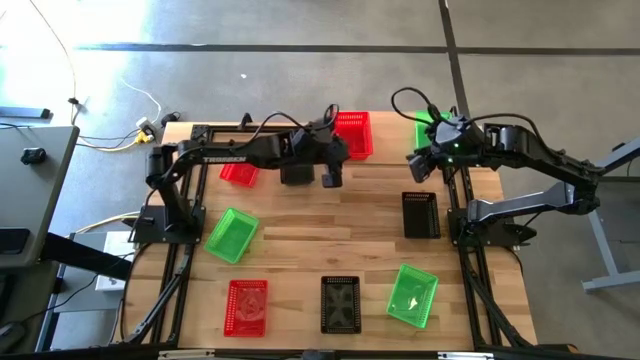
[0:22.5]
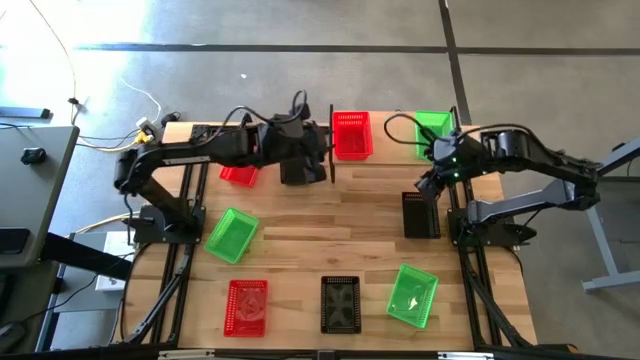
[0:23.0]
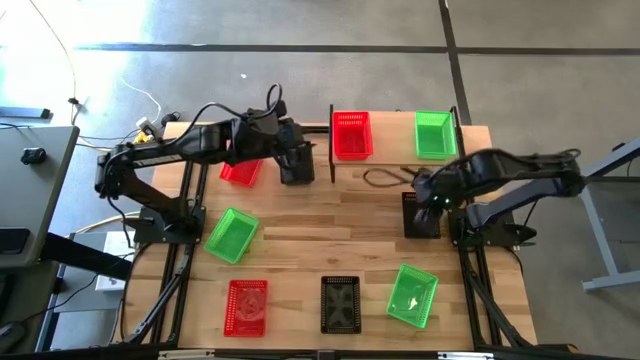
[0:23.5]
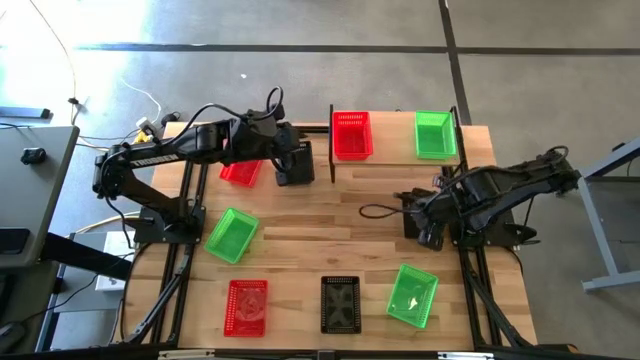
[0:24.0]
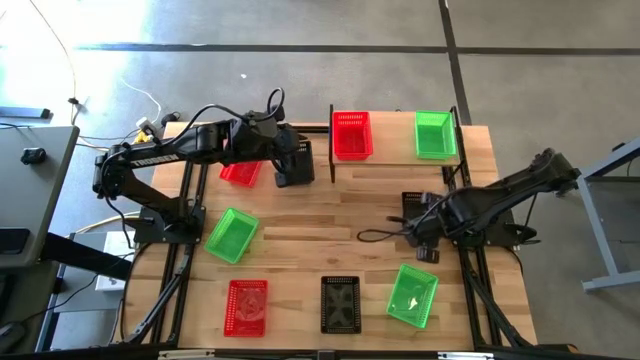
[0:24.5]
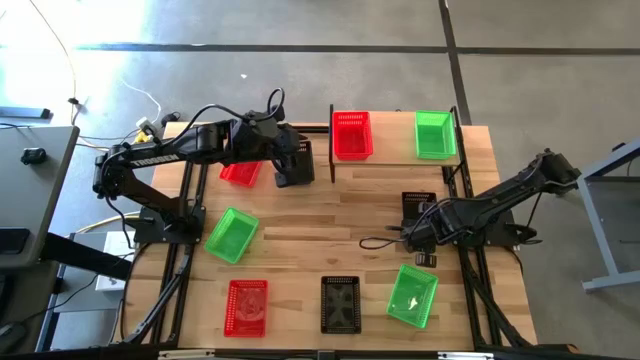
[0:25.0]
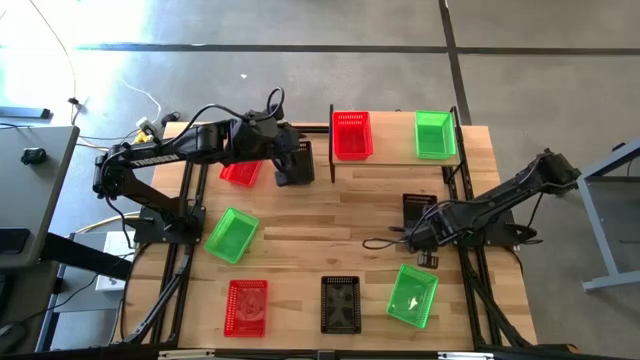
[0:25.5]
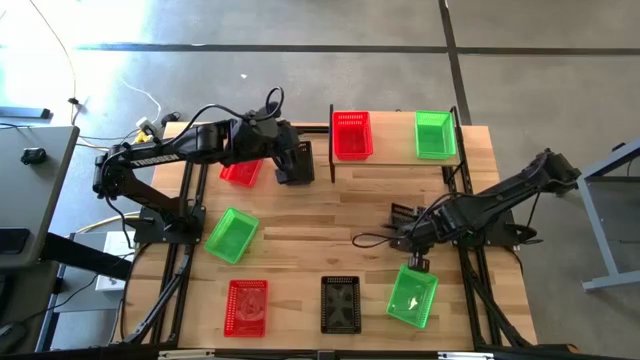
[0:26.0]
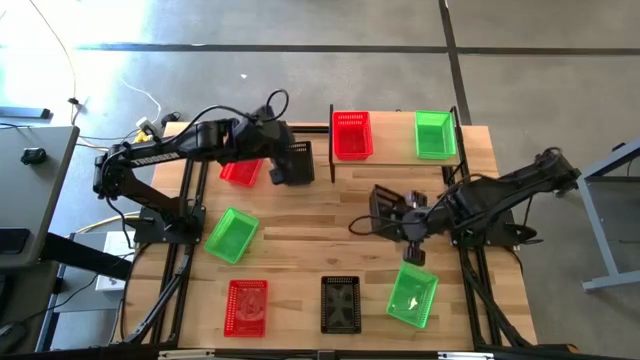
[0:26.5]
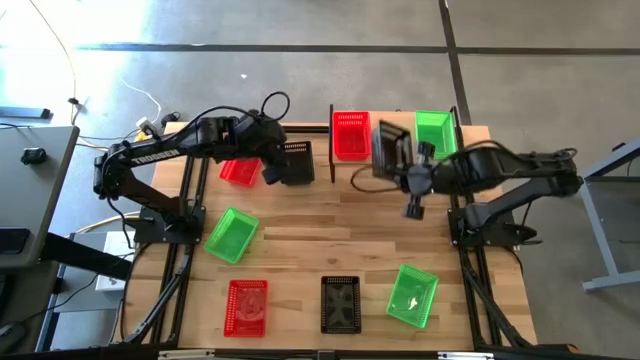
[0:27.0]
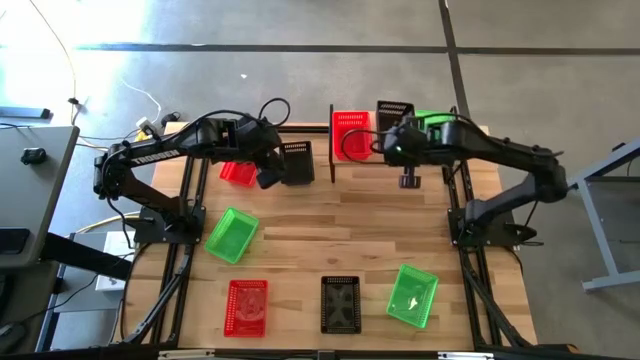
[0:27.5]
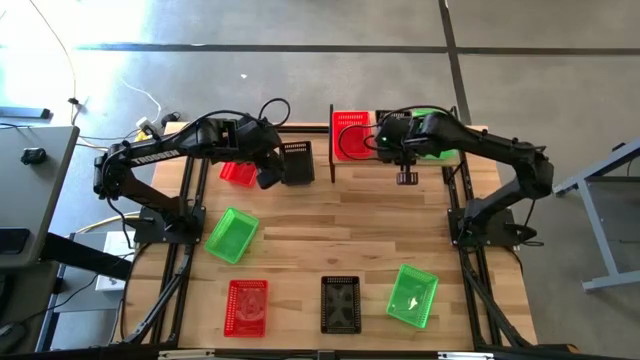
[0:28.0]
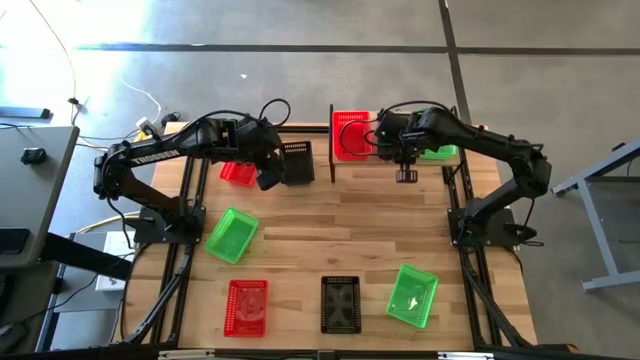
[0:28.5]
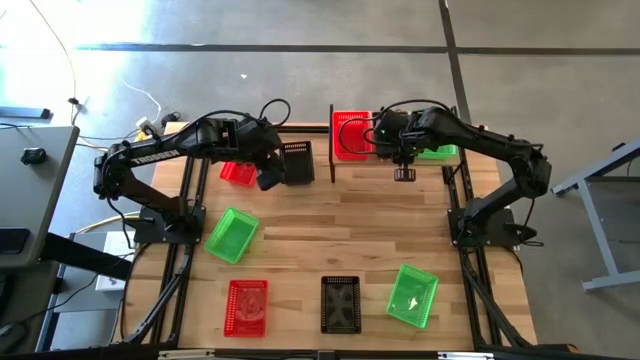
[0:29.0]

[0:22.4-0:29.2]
Task: Stack baskets on shelf by color
Put the middle black bin on the shelf

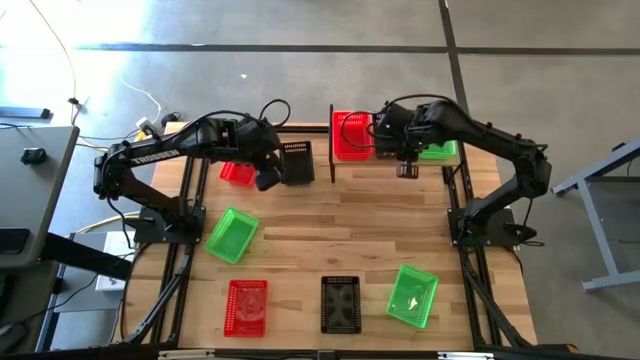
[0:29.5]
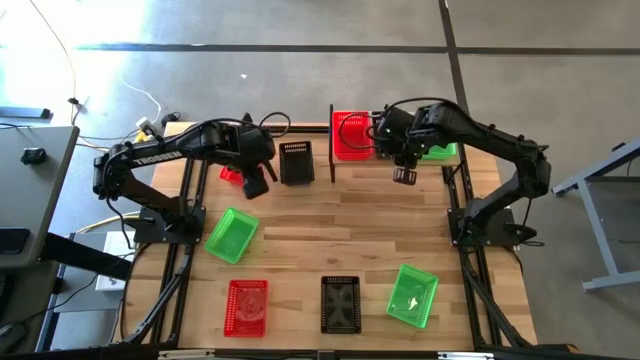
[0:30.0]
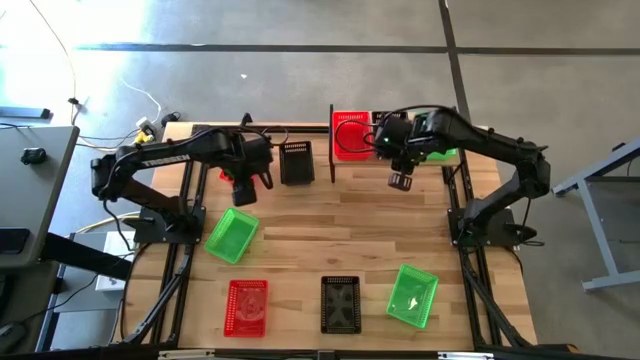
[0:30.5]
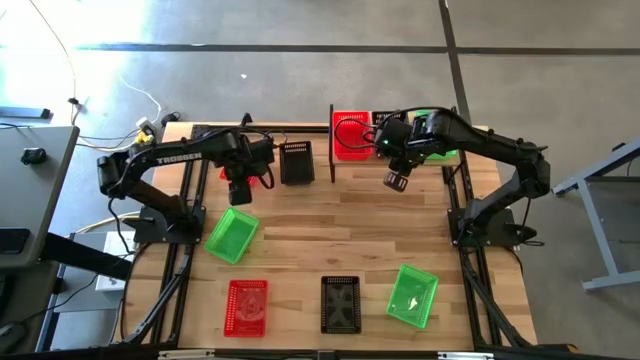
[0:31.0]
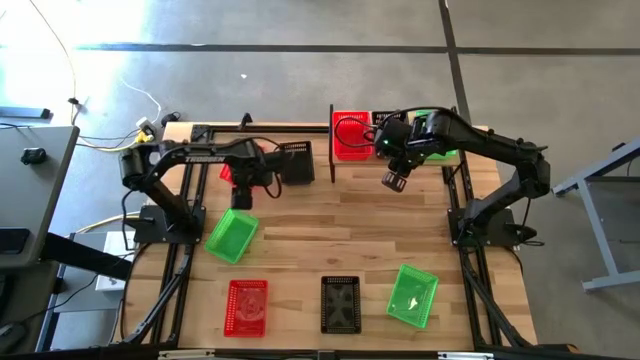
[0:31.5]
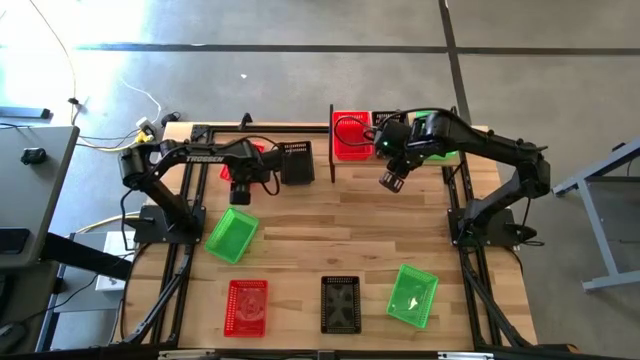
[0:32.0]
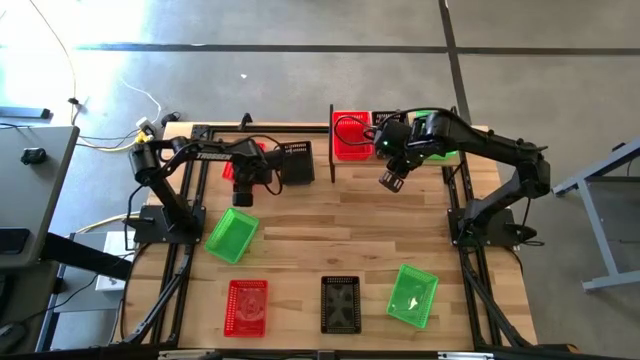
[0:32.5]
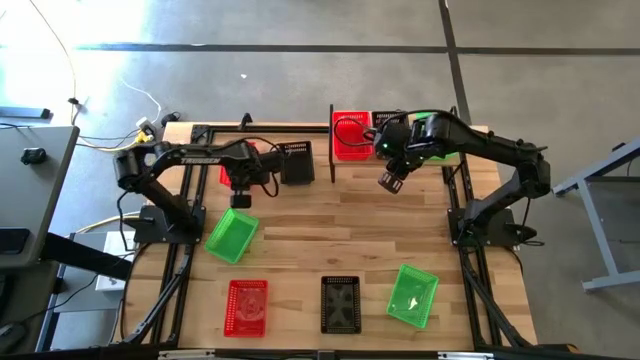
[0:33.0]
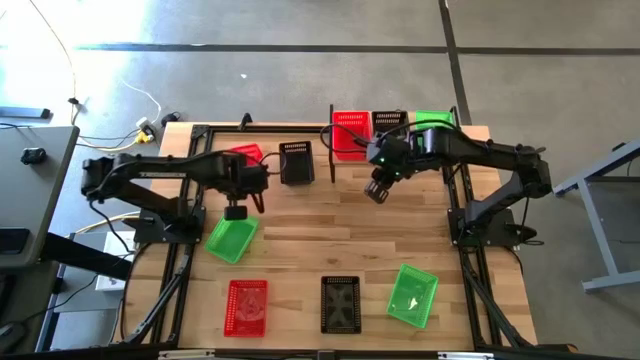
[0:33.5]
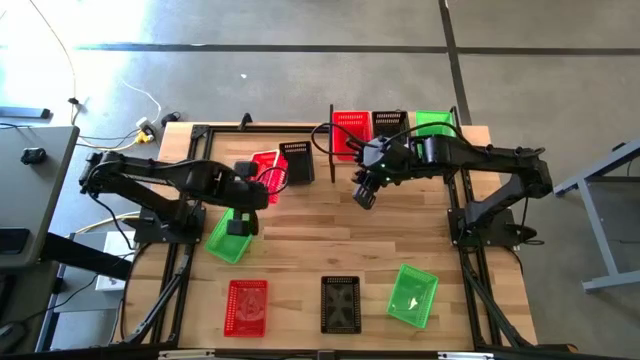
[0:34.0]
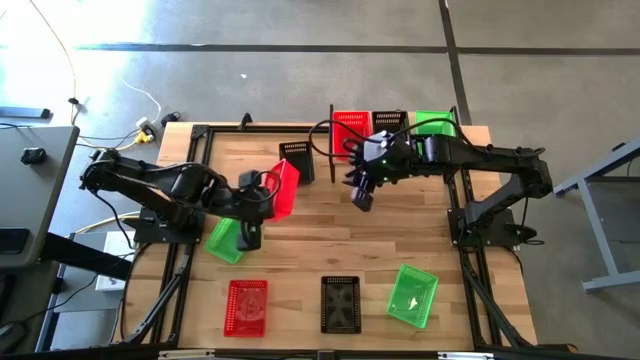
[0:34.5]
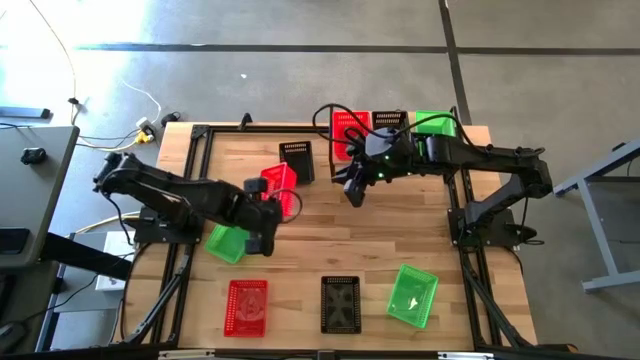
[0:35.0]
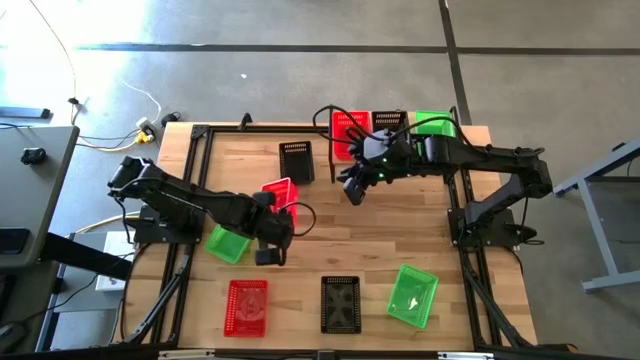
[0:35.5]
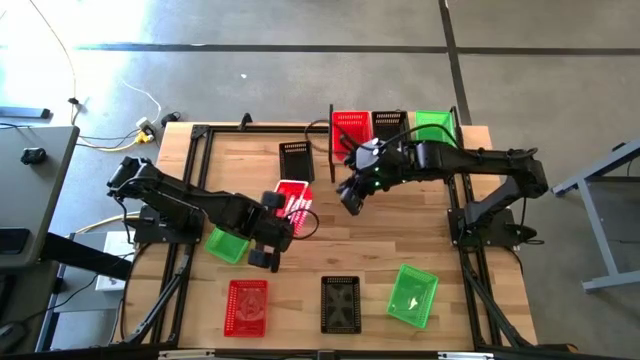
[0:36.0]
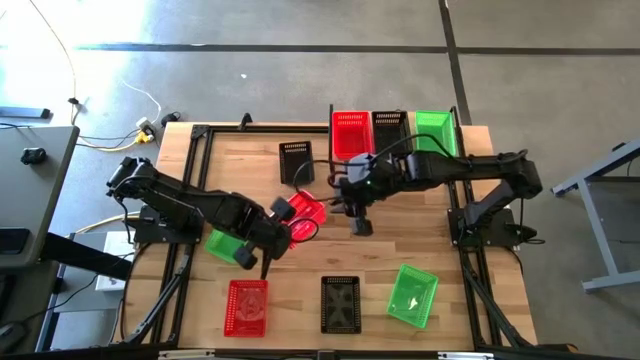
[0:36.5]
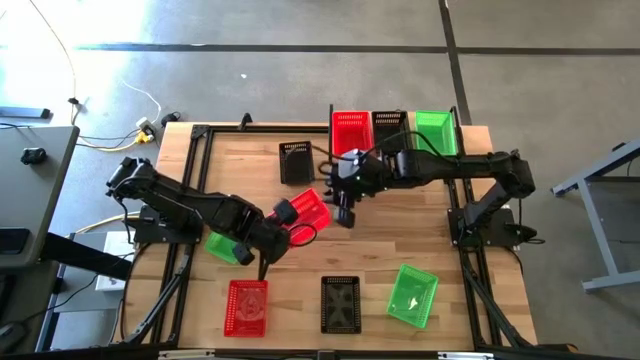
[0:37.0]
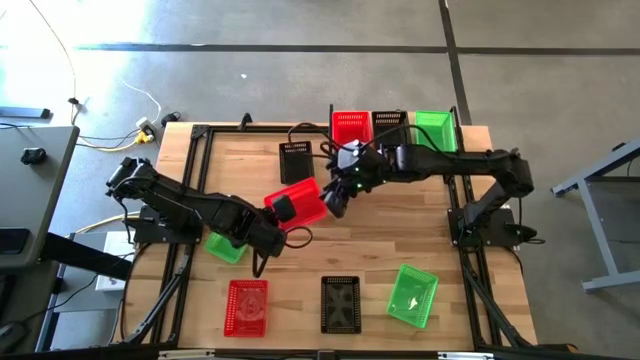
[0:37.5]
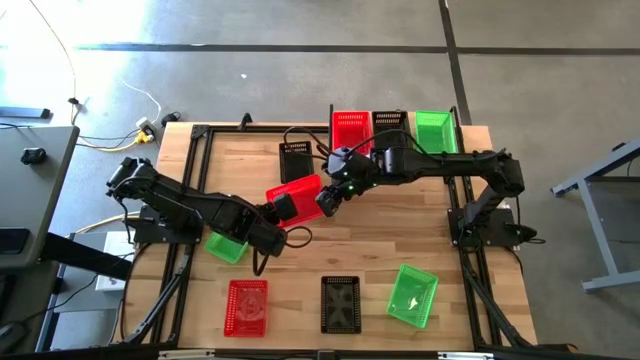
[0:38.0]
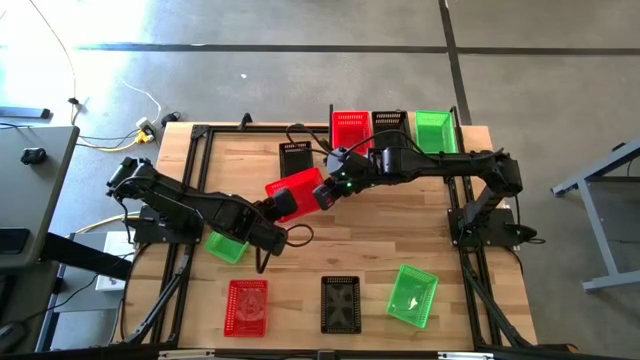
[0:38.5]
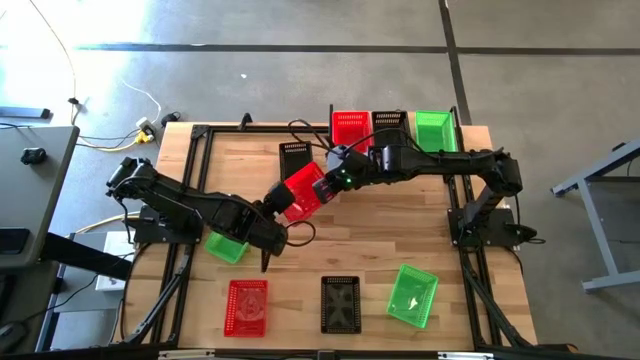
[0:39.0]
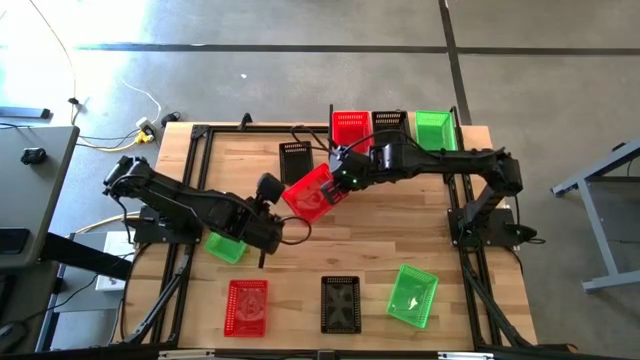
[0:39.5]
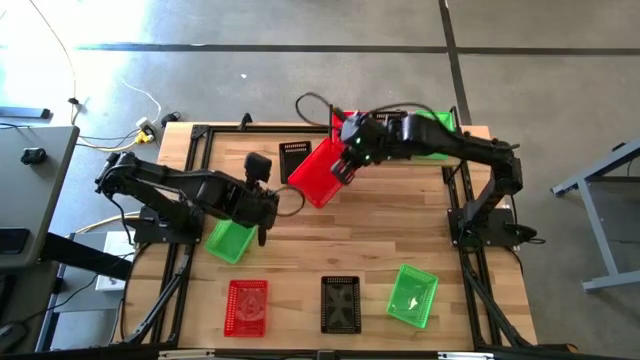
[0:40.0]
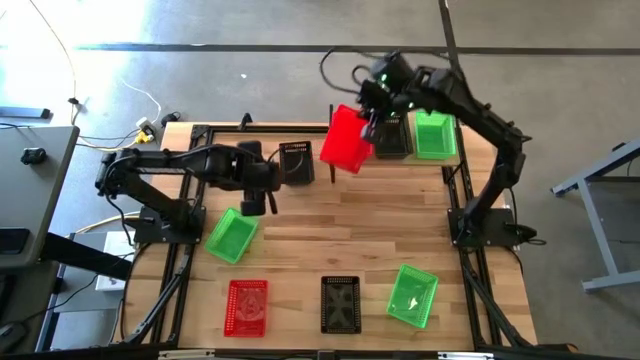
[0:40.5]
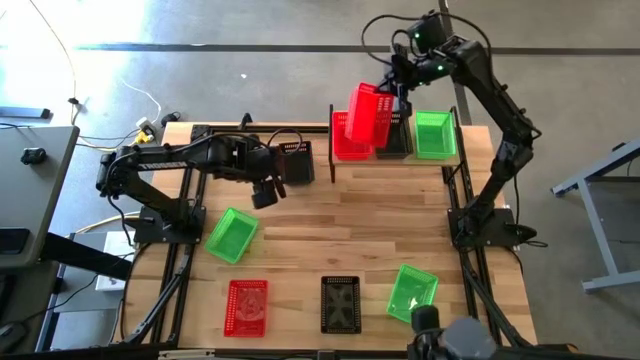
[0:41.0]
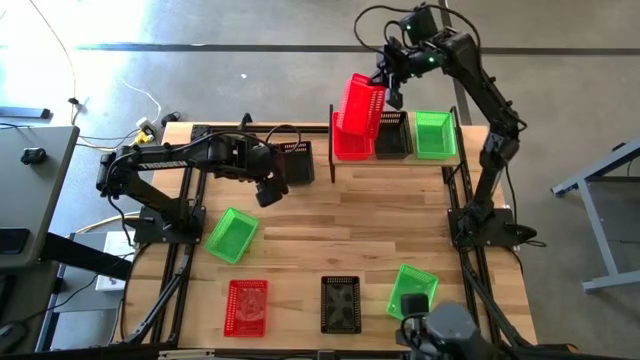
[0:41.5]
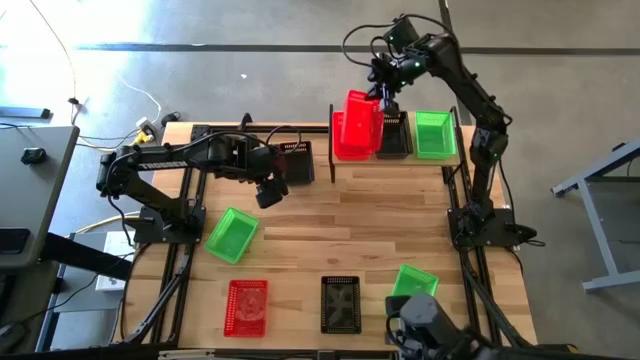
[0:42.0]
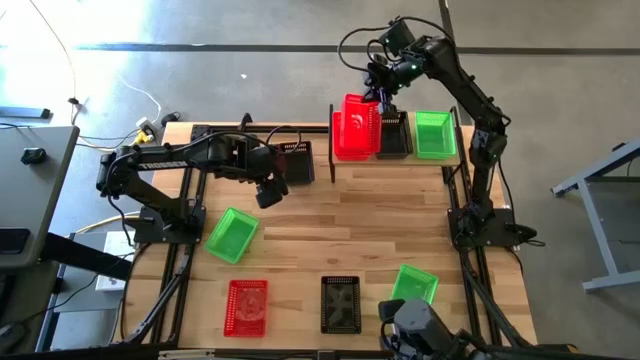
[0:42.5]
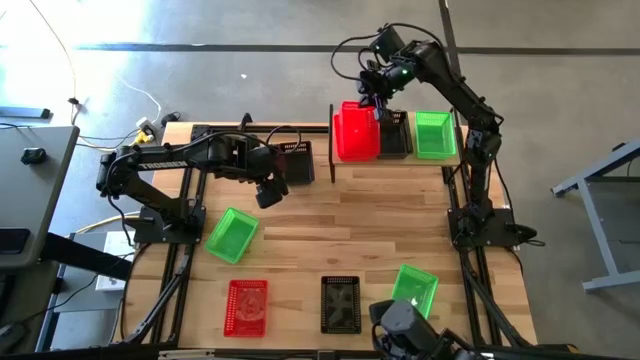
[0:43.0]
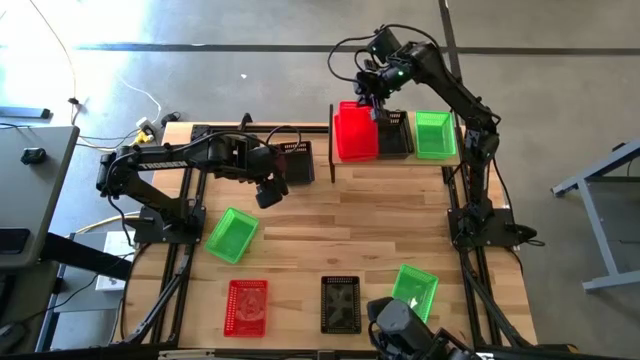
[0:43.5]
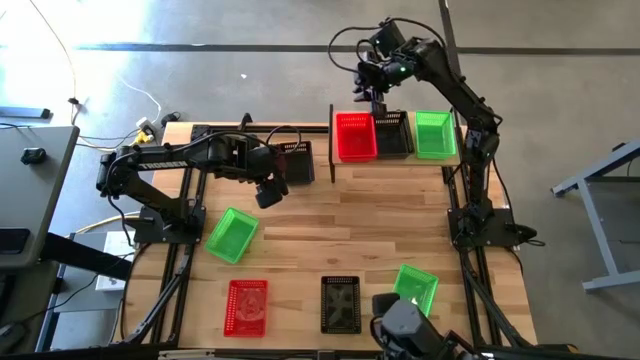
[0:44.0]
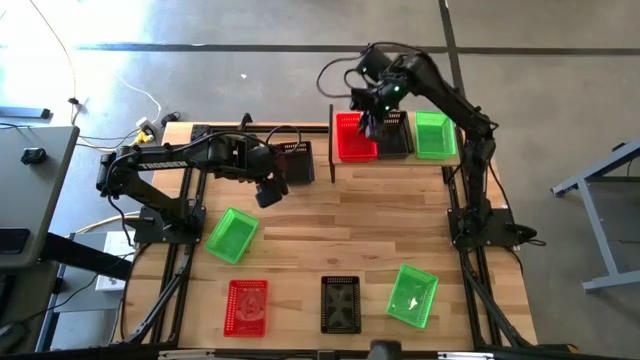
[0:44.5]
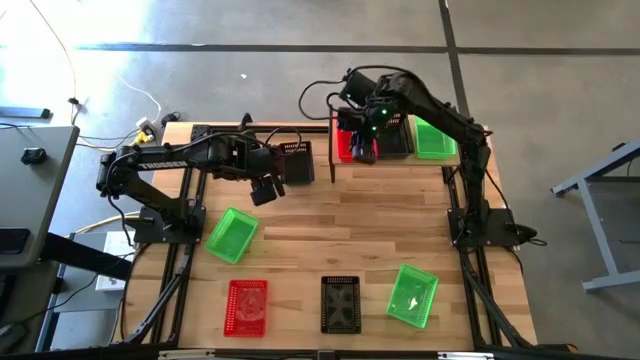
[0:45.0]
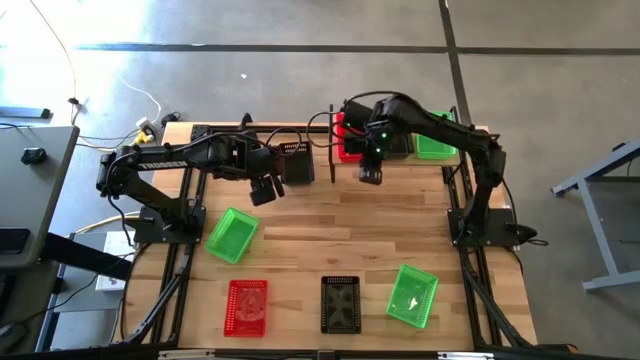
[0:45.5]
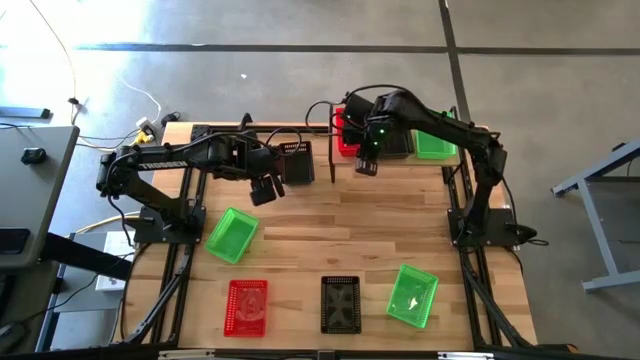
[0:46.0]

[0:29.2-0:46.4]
Stack the top red bin on top of the red bin on the shelf
